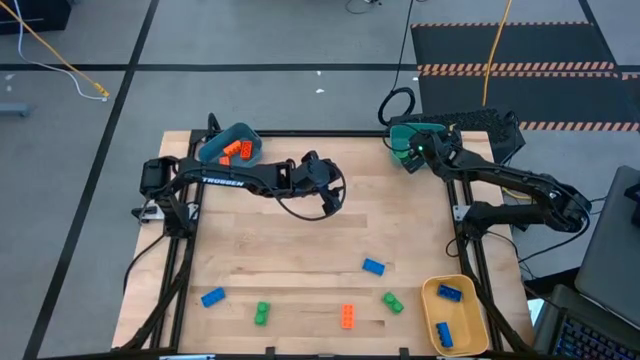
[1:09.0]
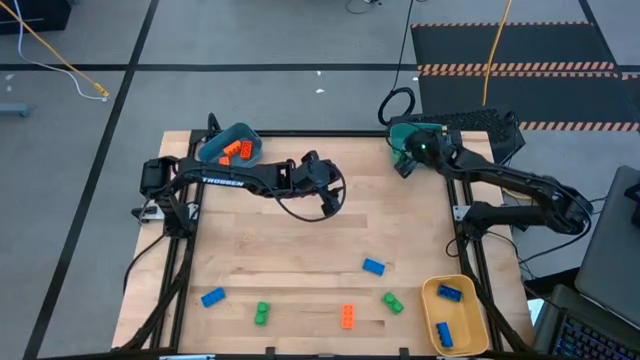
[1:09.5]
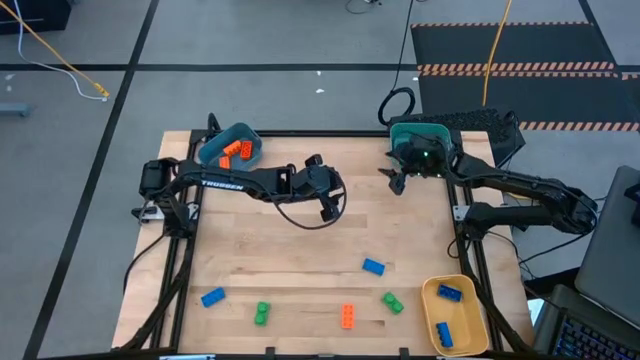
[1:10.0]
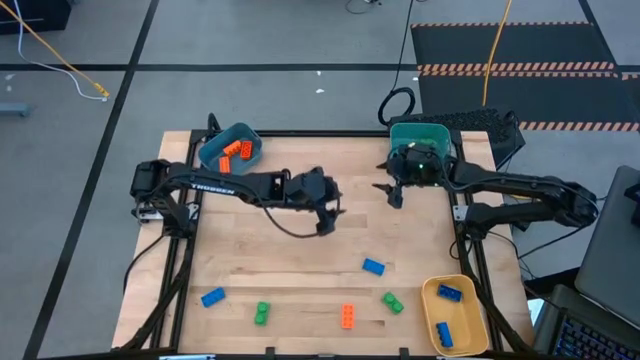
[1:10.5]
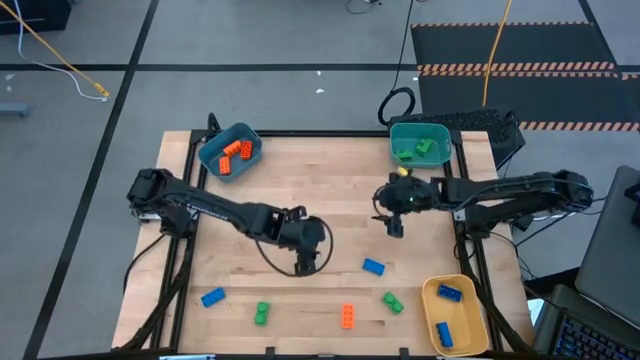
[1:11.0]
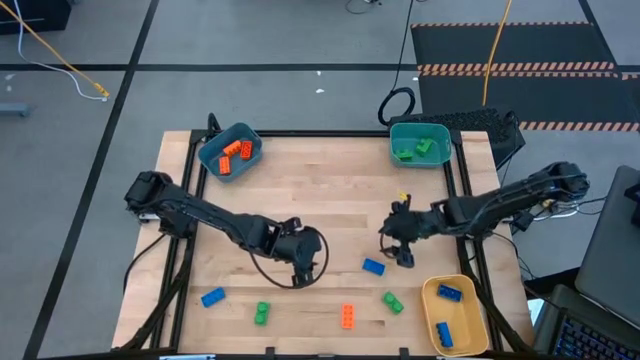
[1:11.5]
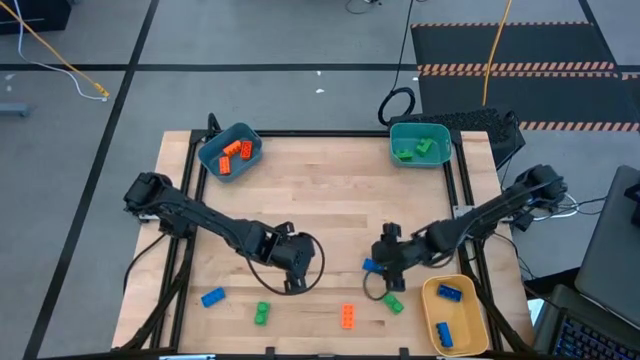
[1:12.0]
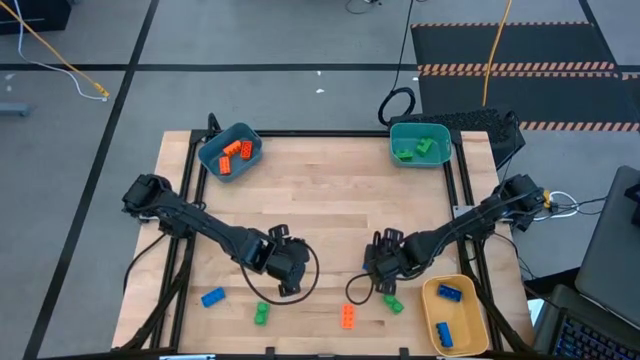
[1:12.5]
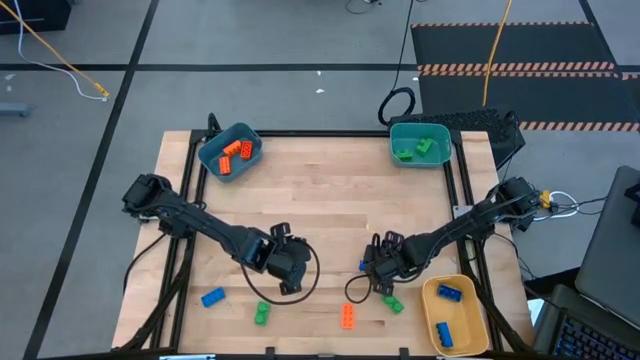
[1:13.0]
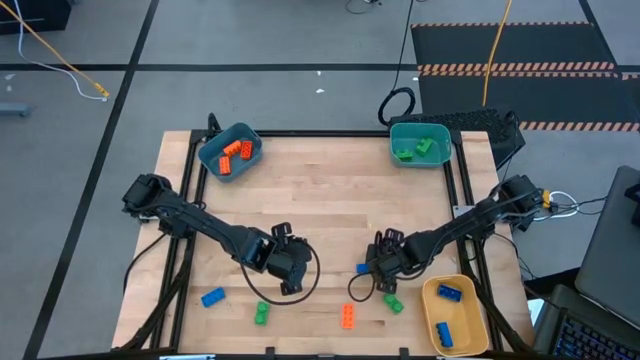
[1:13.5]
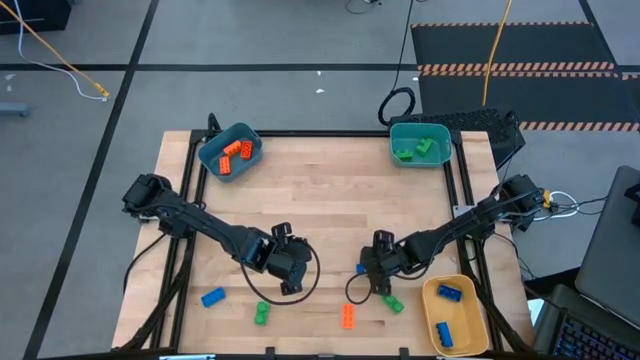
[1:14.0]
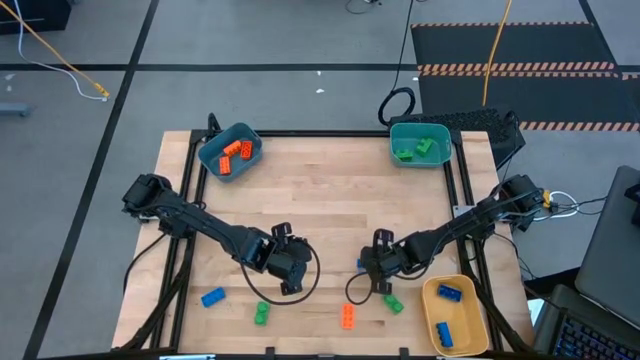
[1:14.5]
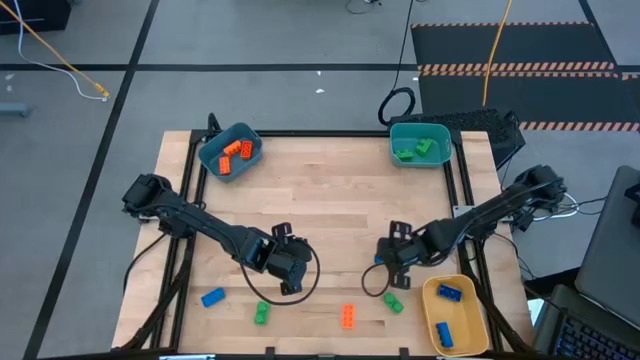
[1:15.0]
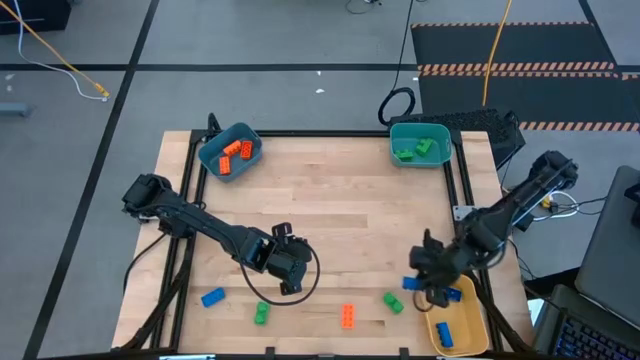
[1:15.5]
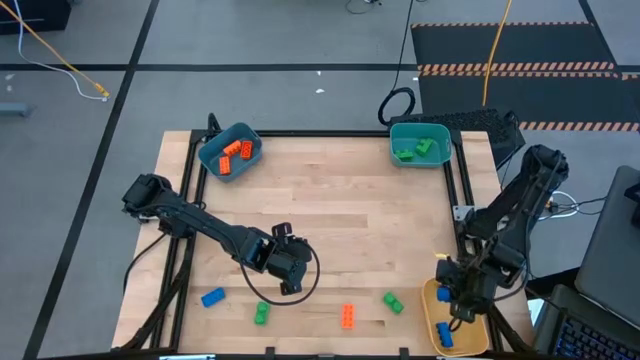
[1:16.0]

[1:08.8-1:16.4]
Task: Sort & place blocks by color
Put the right blue game piece into the yellow bin

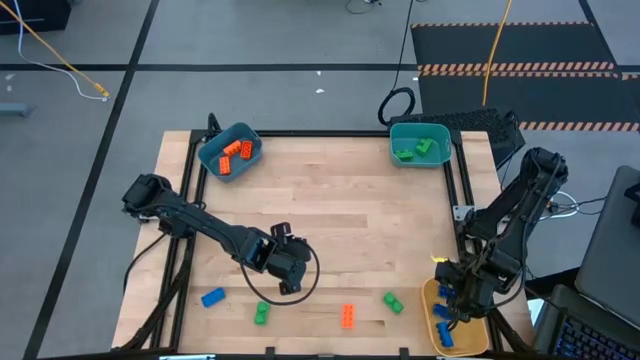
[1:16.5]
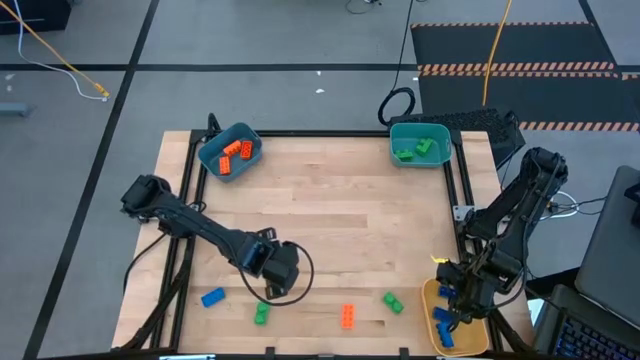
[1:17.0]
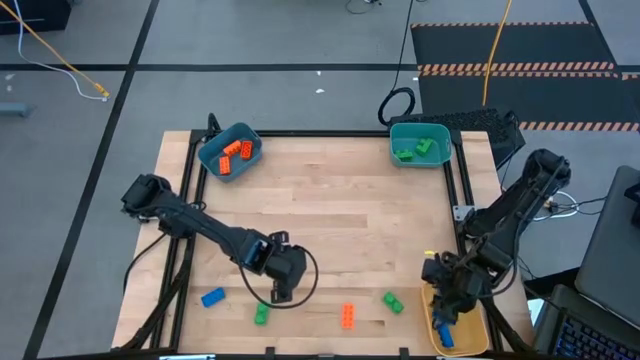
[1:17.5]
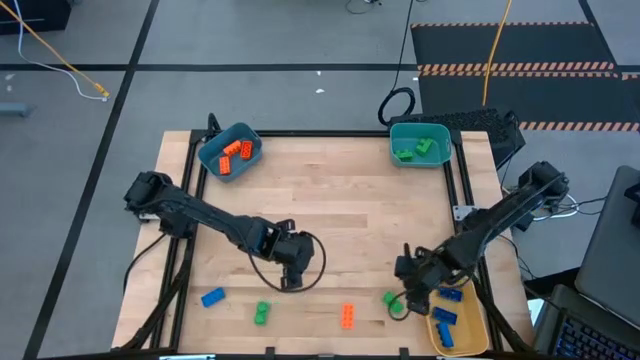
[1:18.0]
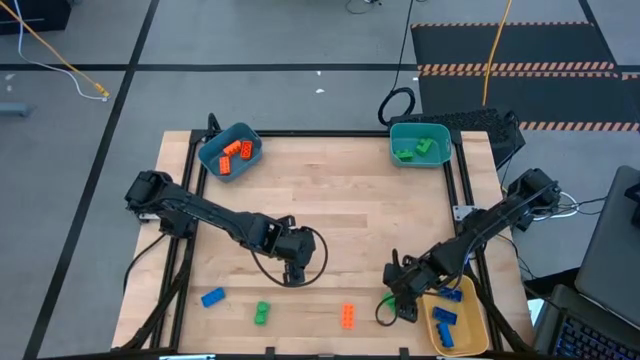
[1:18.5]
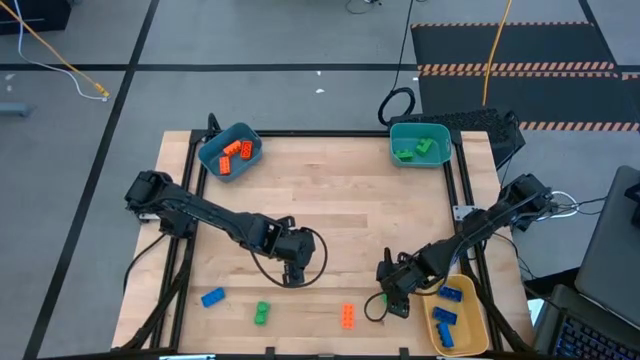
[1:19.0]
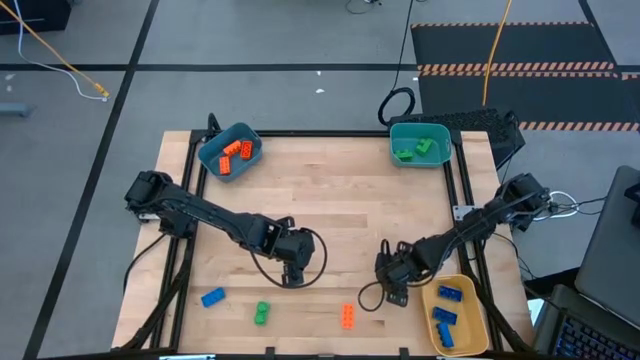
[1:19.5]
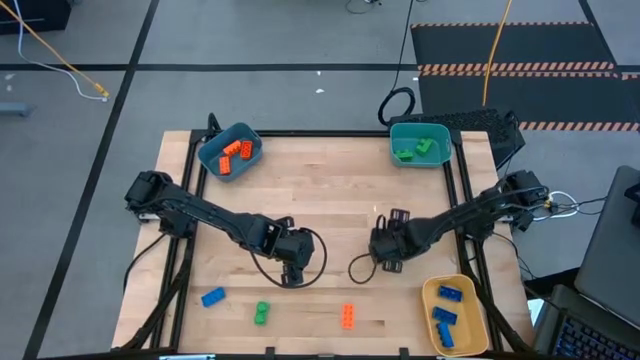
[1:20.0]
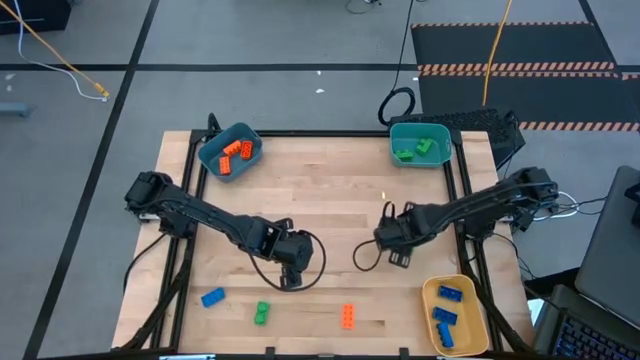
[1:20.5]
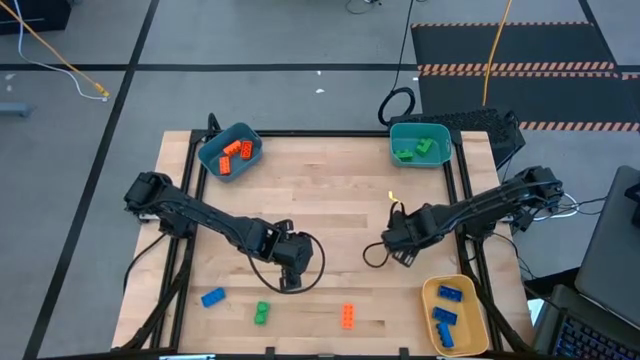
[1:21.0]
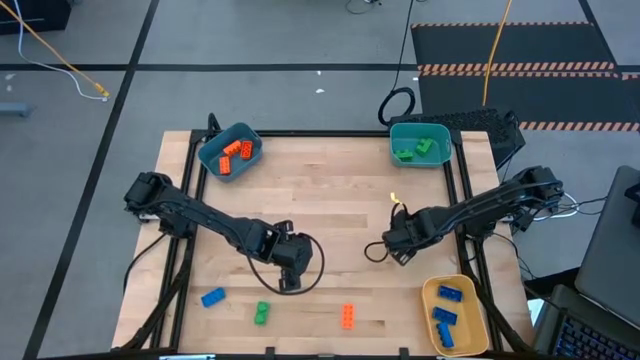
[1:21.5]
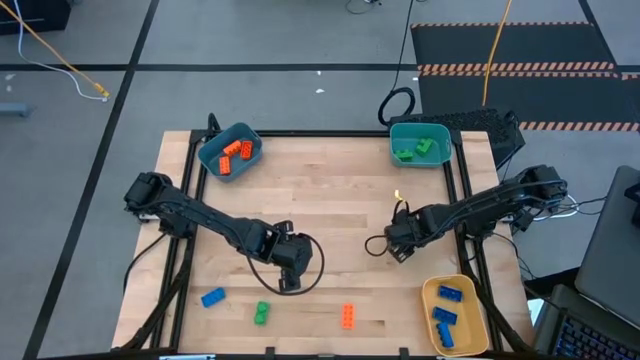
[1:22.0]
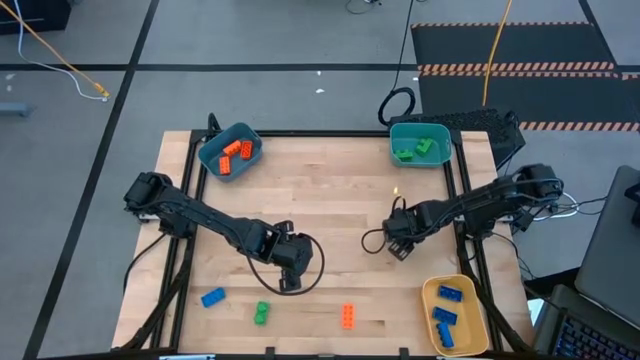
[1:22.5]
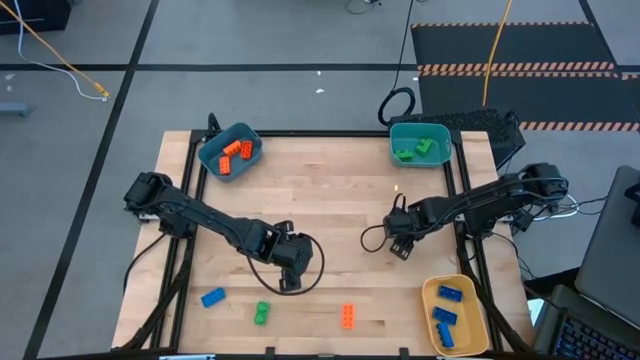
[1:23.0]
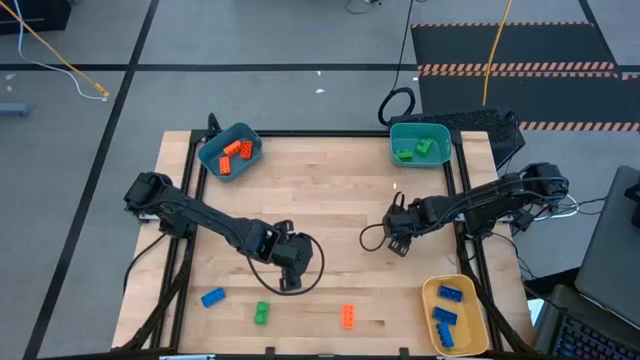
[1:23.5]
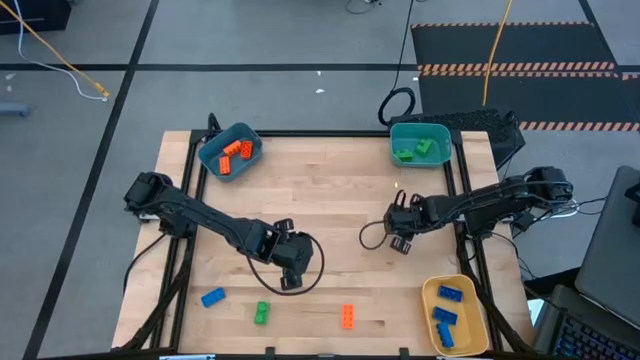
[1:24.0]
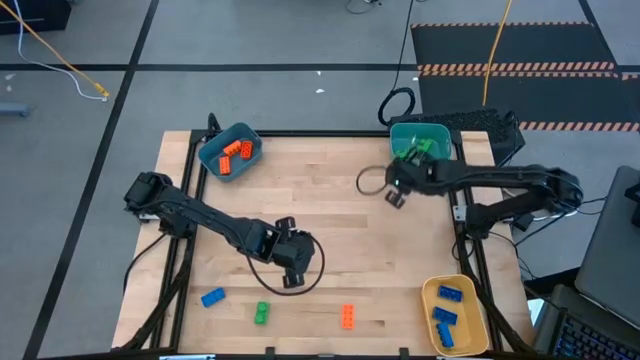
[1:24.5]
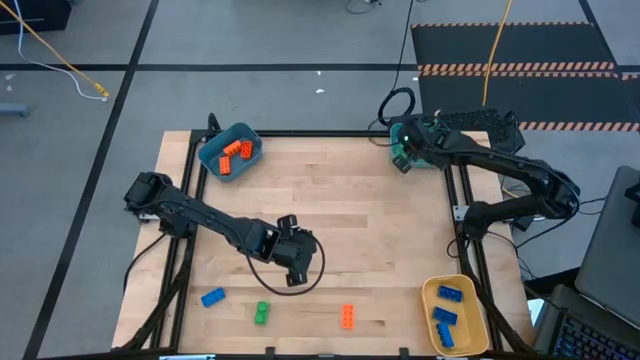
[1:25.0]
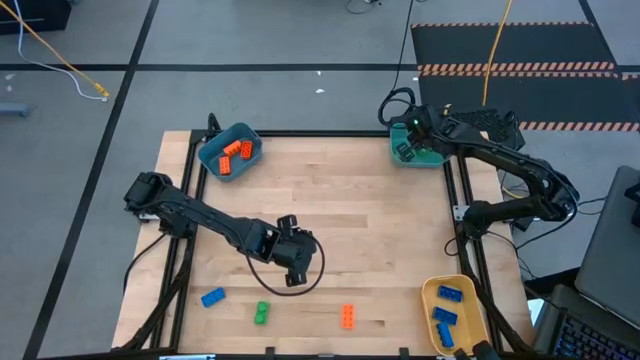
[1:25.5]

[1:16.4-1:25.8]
Put the right green game piece into the light blue bin

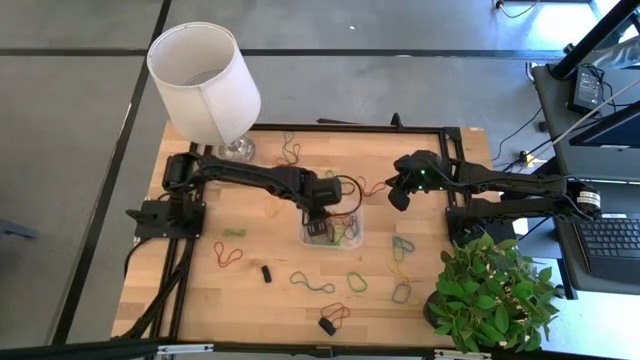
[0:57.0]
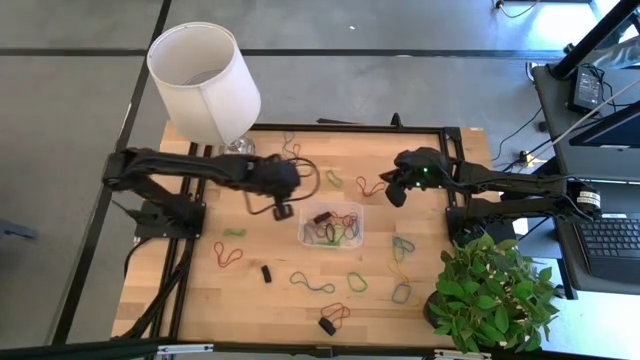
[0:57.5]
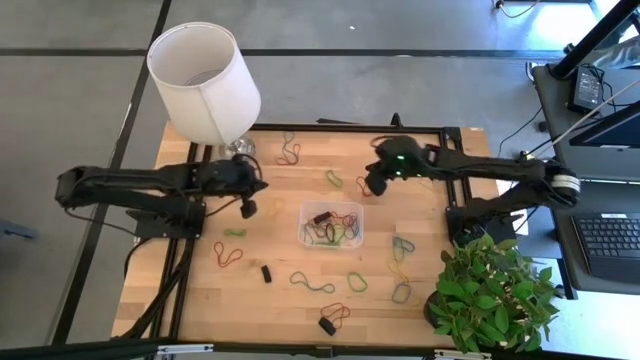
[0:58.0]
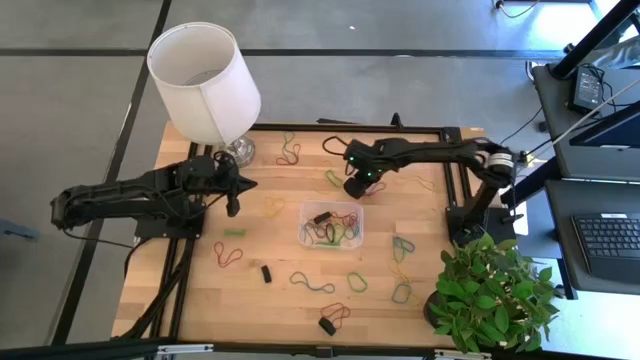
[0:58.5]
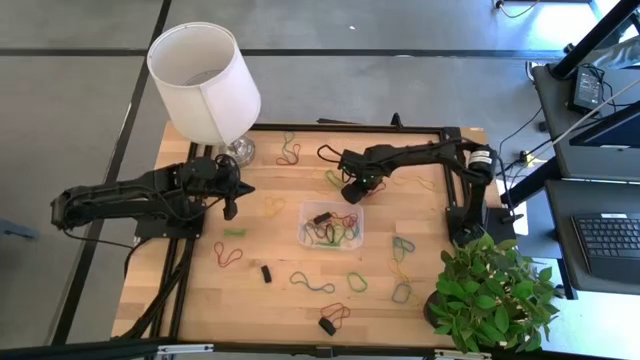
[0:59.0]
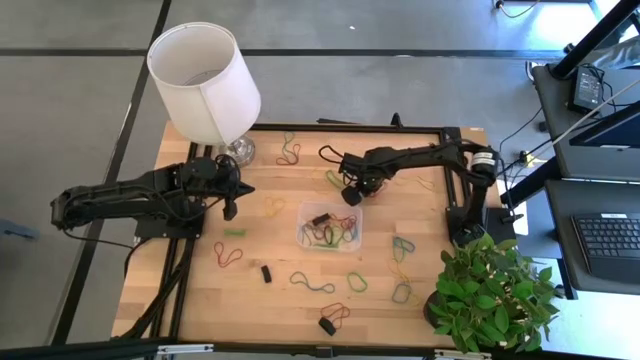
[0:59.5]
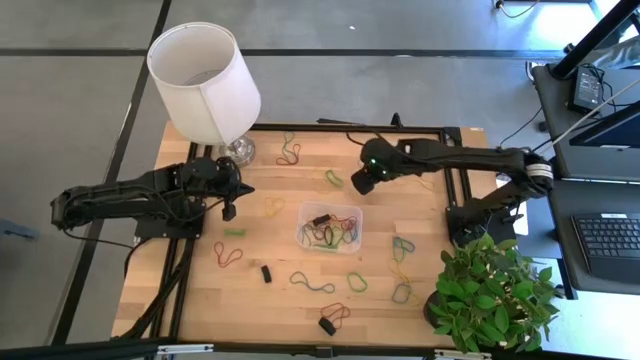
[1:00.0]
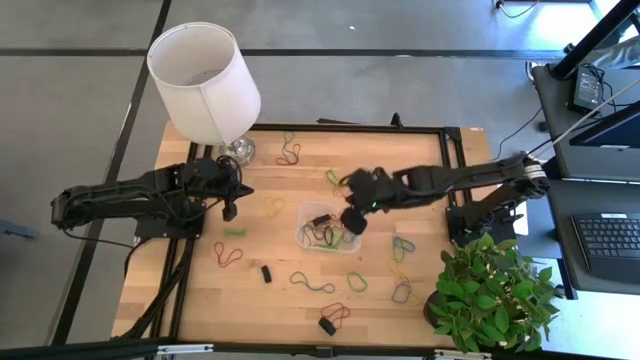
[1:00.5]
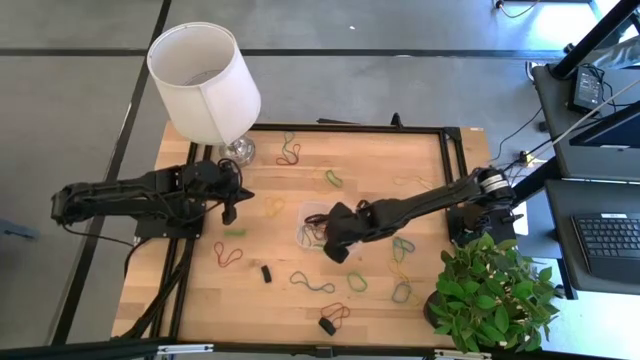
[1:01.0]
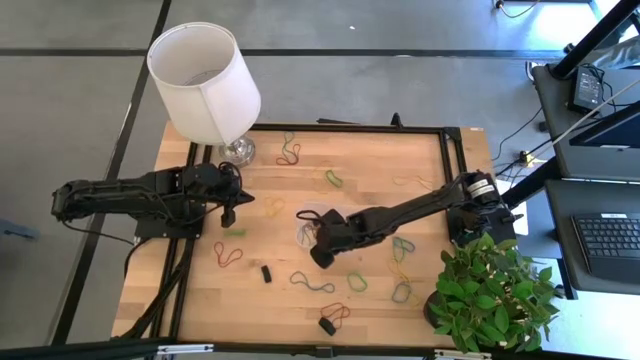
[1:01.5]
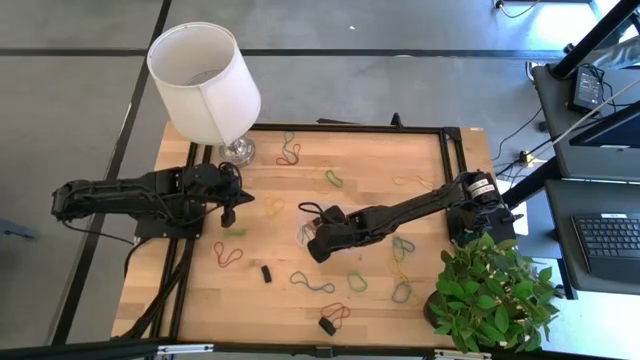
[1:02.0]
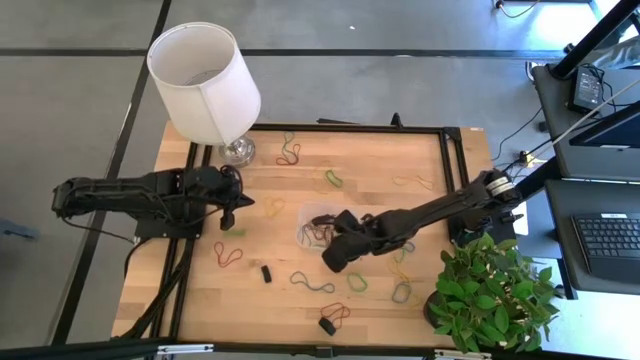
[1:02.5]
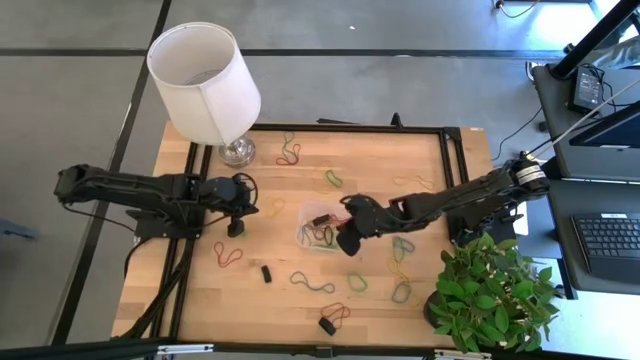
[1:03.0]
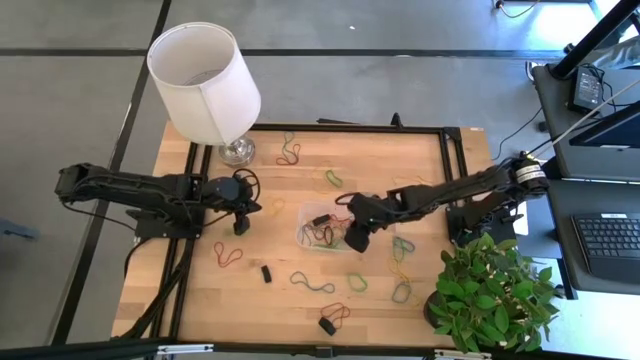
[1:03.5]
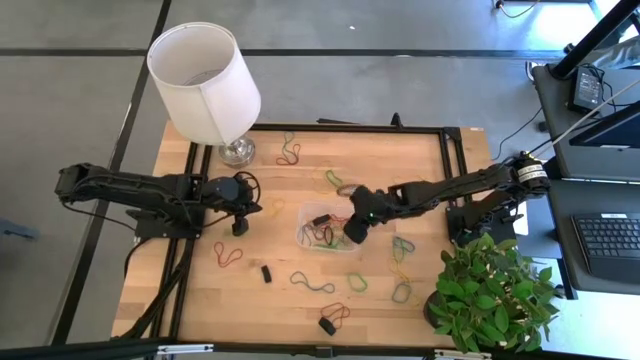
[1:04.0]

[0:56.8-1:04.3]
Task: Pick and place rubber bands into bin
Put the red rubber band into the transparent bin
